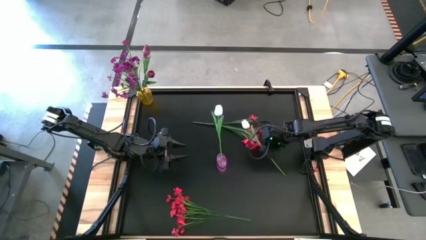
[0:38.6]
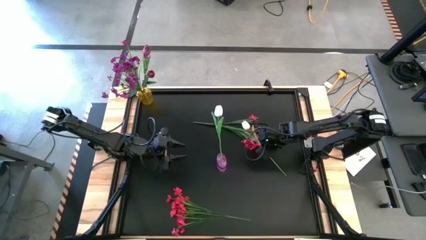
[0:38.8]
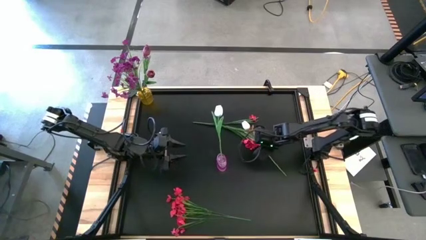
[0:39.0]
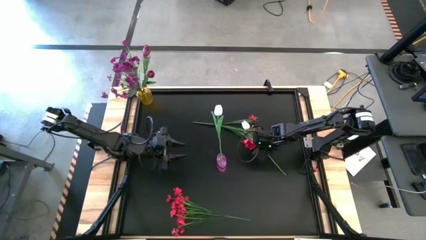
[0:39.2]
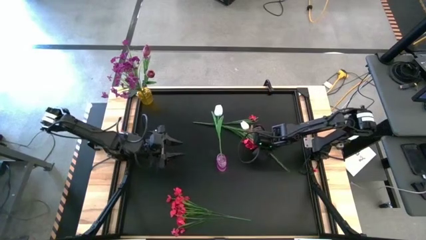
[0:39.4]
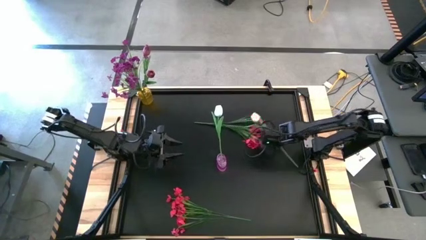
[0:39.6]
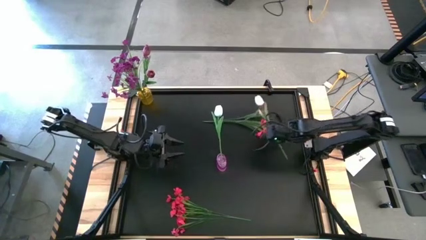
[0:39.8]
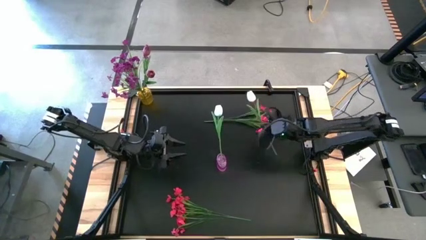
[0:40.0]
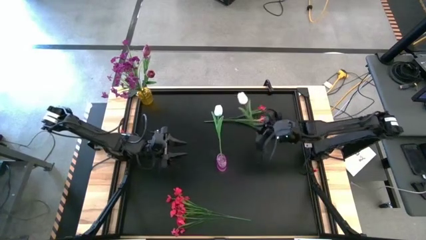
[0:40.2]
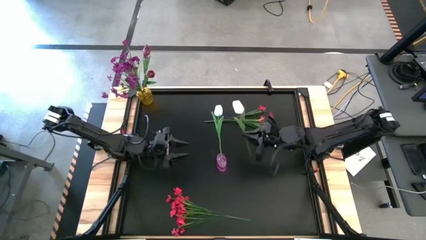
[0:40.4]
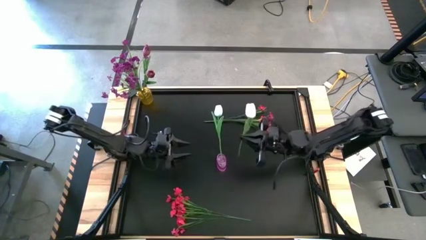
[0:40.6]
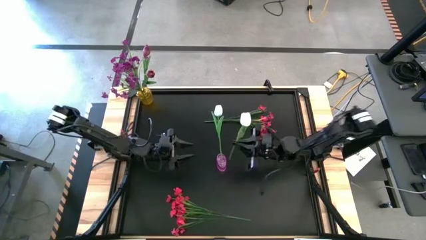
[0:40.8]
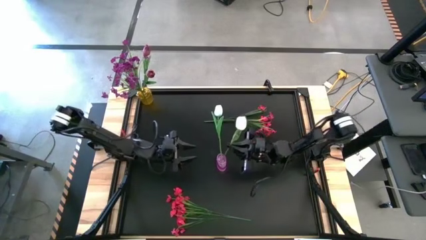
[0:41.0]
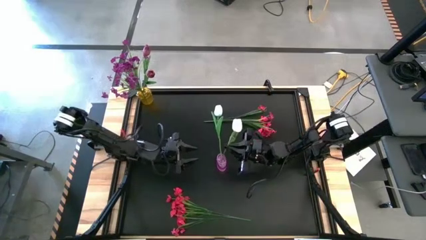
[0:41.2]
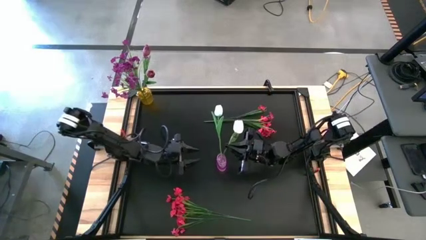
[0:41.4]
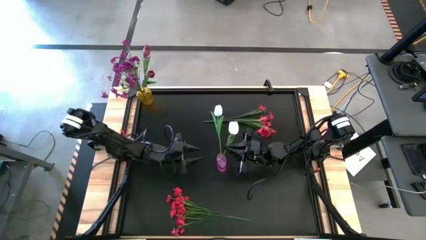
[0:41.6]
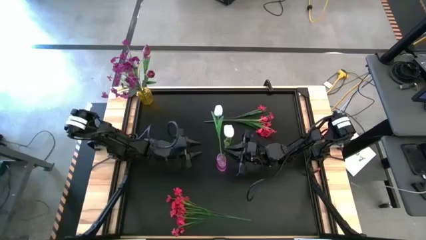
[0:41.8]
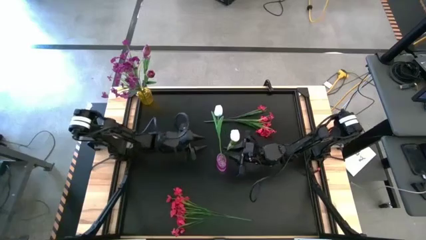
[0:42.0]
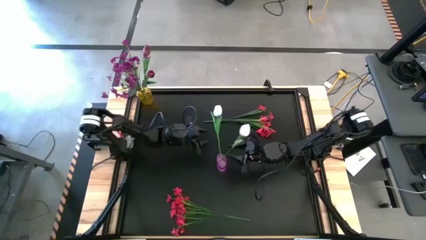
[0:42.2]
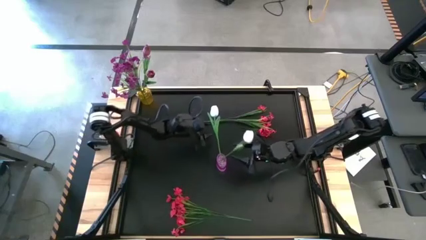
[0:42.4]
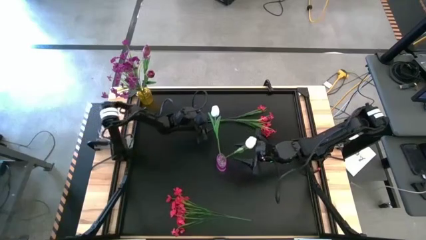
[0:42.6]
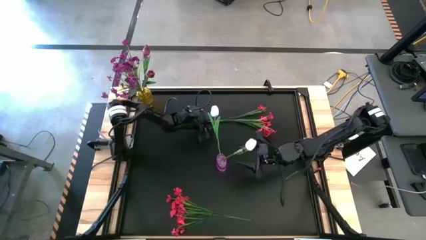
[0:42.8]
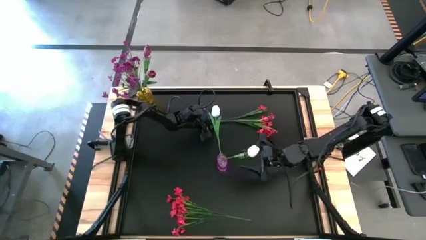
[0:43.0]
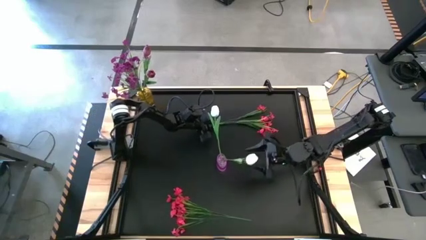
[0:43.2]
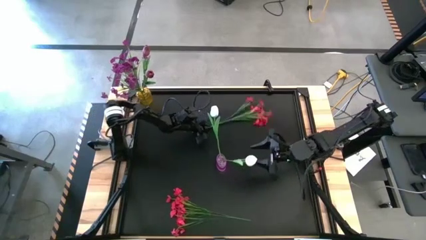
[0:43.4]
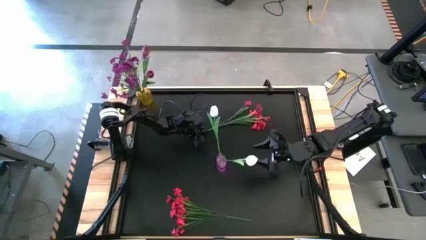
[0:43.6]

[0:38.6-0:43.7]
Task: Sort flowers into vase by color
Put the white tulip into the violet vase

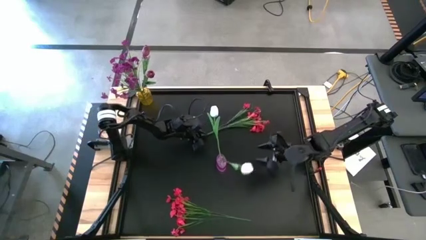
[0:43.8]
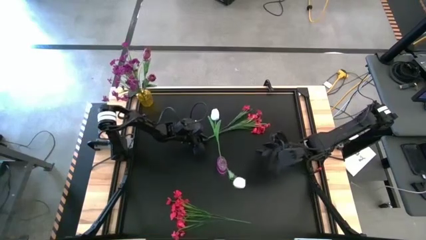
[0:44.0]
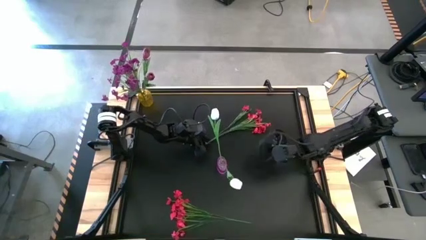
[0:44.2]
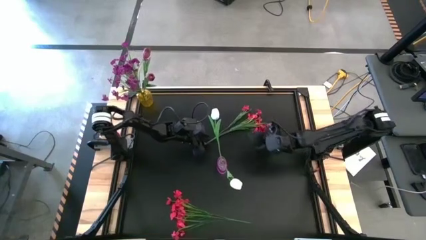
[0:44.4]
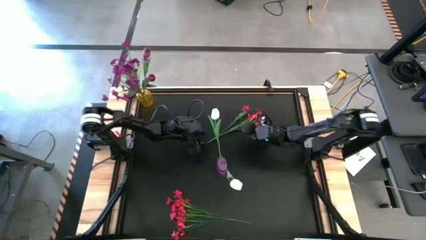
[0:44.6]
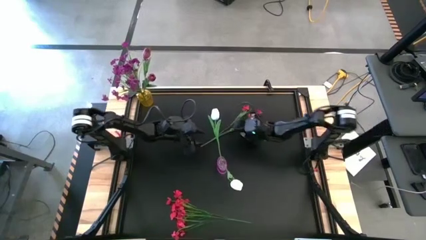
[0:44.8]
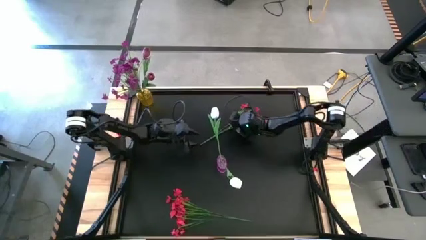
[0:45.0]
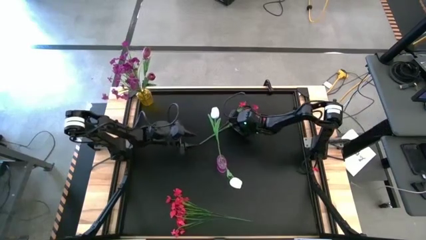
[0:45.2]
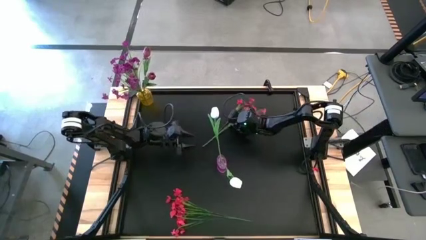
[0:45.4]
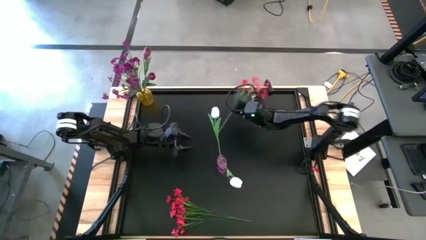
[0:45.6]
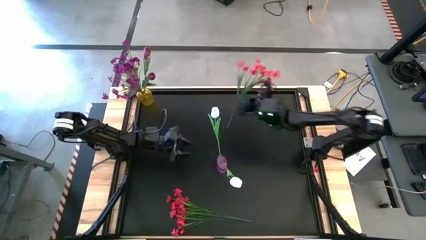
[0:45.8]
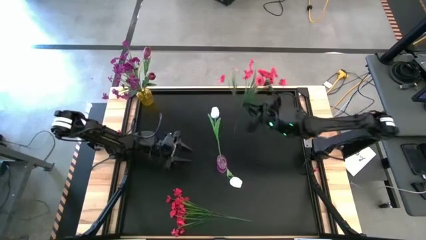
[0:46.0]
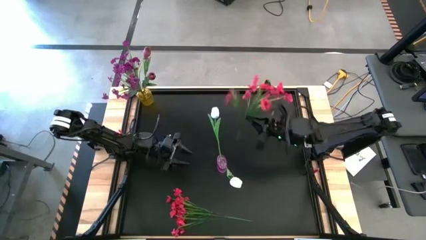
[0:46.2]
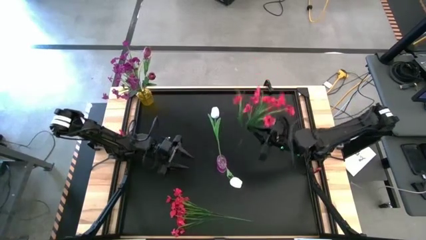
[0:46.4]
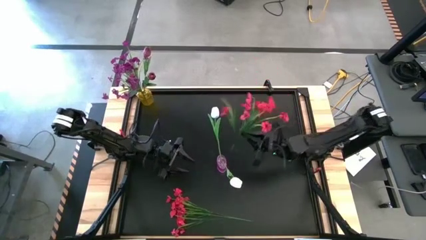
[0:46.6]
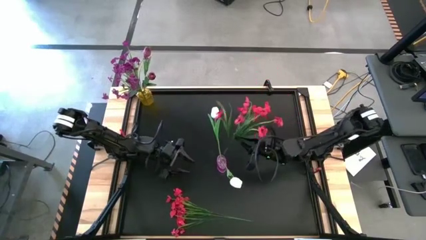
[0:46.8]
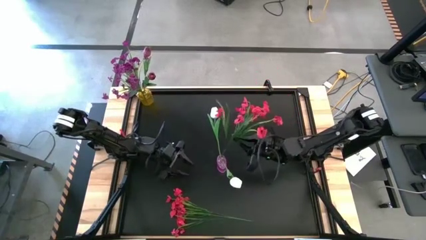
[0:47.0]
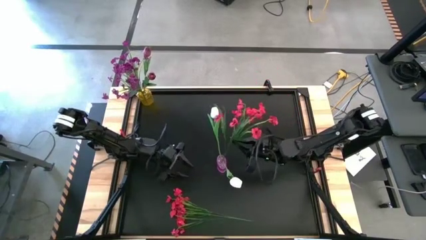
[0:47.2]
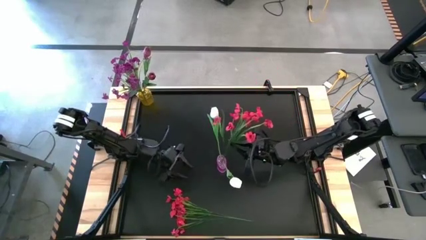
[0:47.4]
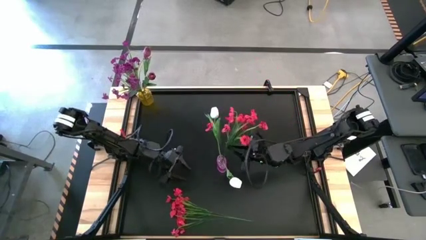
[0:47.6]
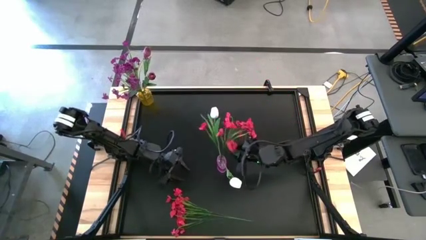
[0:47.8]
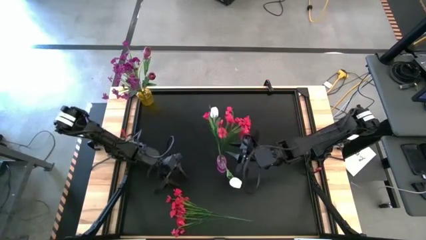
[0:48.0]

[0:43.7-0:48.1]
Put the top red flower into the violet vase

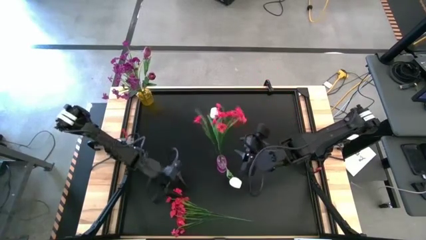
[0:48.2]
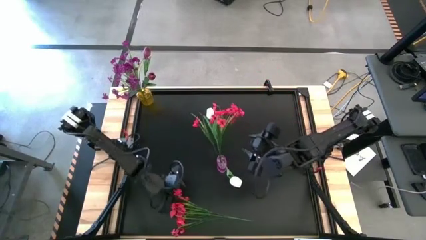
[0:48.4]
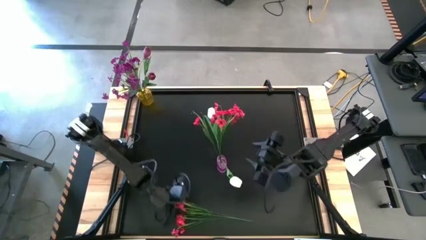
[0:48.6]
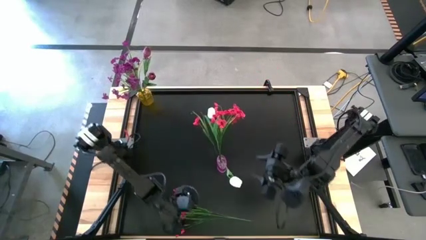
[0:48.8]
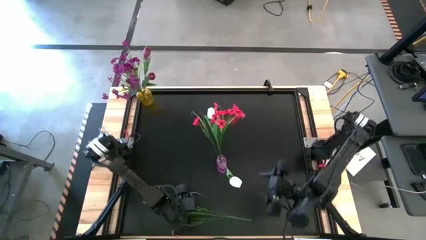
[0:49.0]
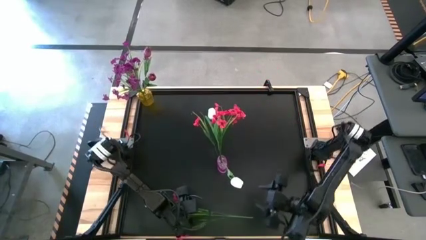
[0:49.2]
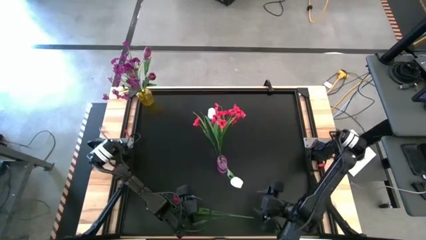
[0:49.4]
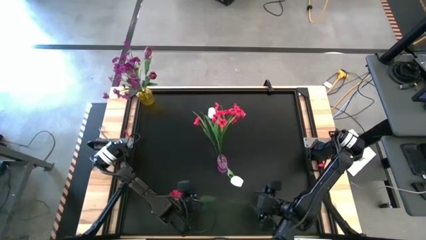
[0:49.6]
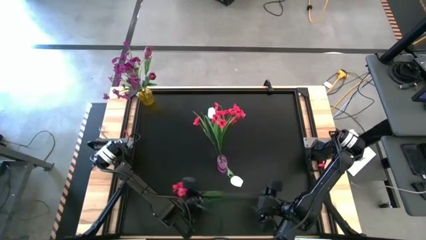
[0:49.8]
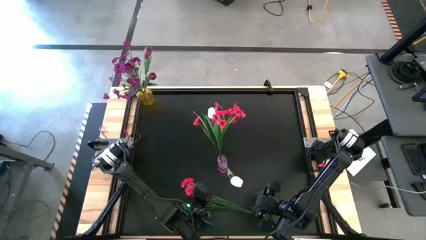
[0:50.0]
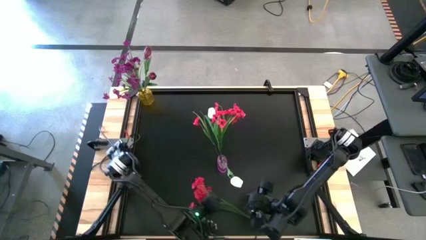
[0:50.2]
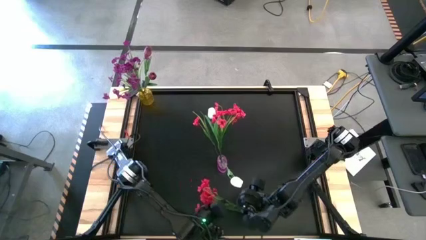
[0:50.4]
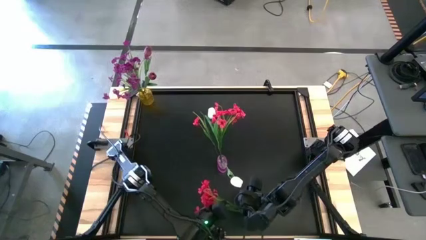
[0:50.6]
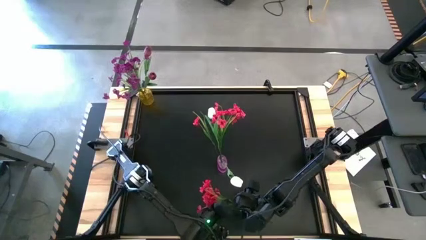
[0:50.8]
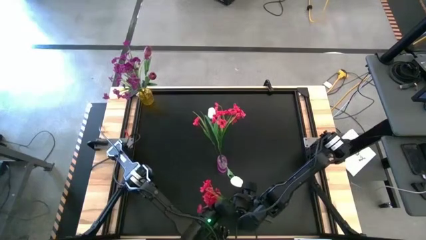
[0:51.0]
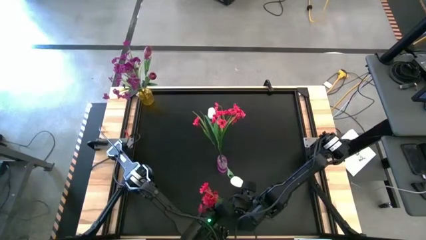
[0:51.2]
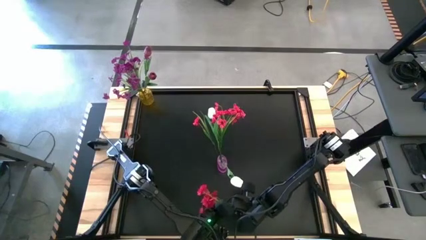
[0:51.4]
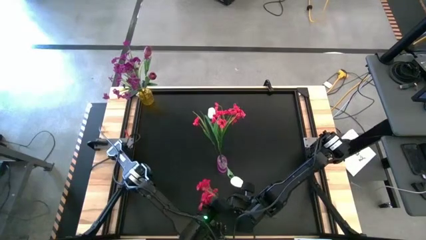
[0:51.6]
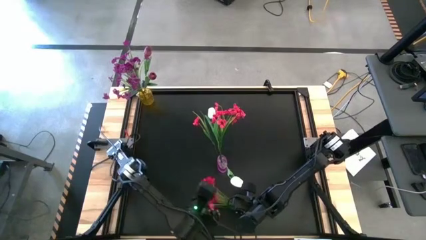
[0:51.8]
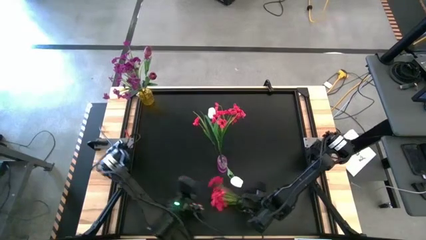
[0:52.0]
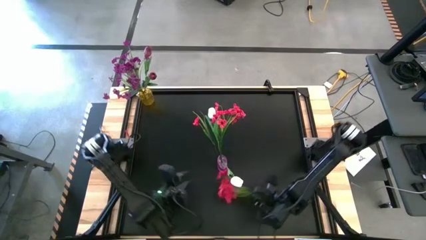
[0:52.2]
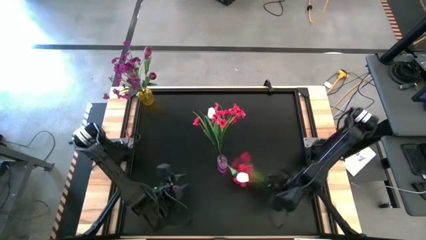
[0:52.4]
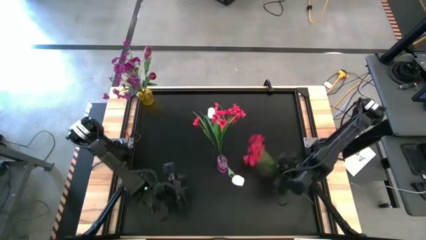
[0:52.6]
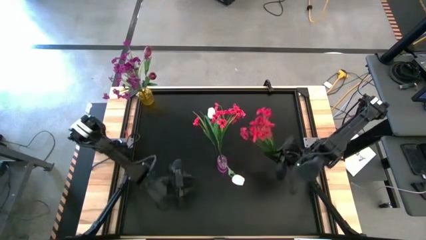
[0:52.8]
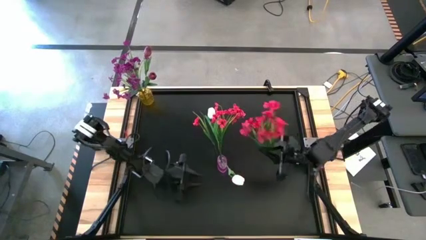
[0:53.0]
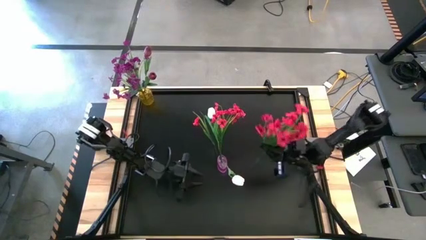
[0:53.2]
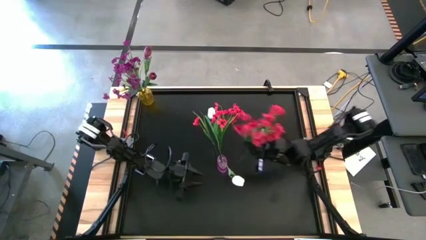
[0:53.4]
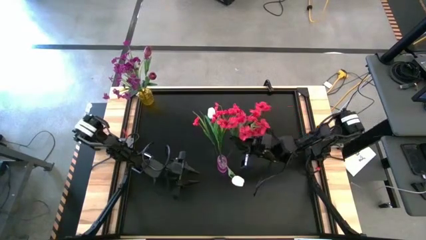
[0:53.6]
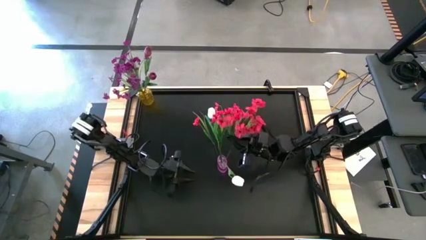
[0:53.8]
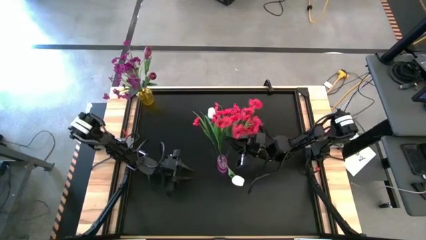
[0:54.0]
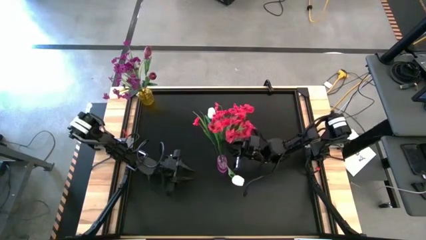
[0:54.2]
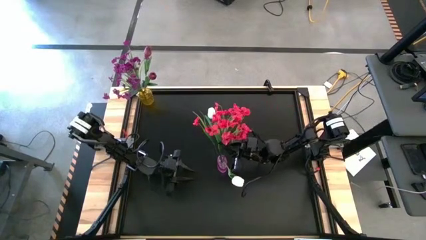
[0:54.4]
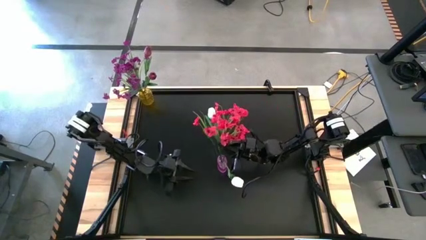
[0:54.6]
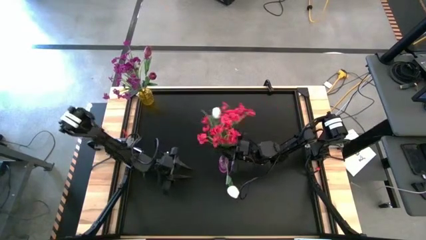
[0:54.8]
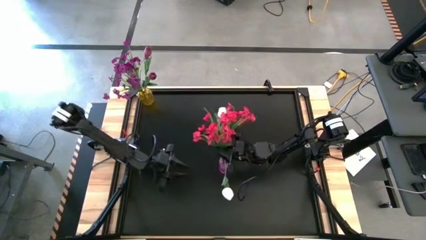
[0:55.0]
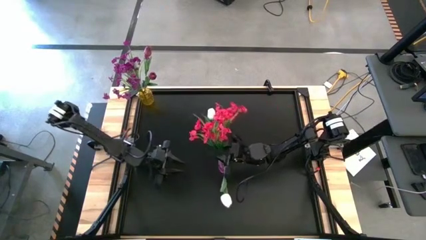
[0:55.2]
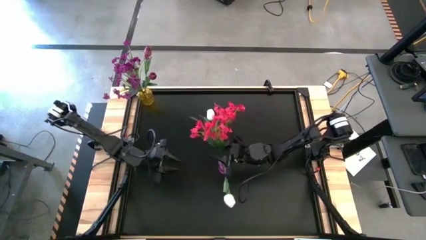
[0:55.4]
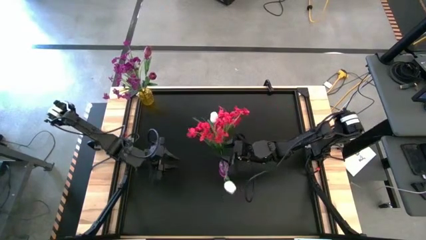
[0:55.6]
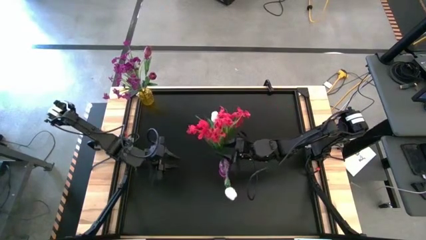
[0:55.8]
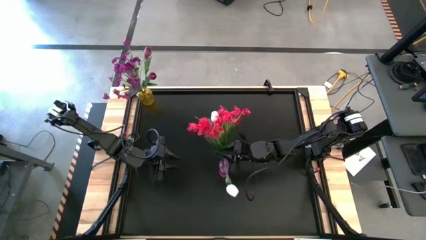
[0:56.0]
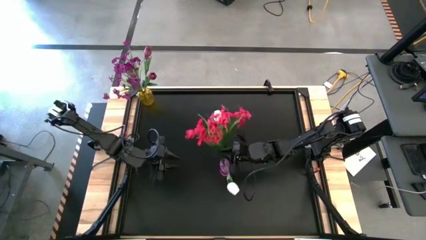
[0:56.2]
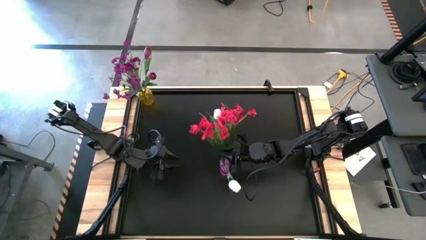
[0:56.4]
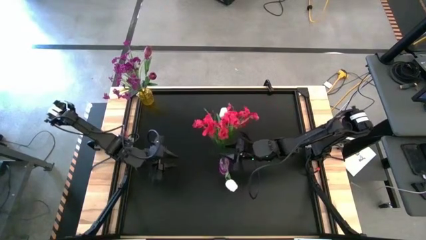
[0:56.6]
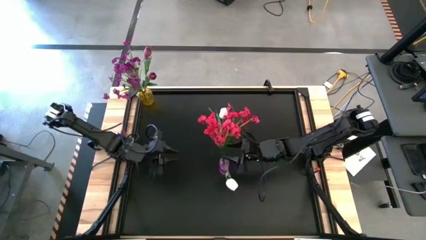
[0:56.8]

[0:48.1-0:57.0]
Put the red flower into the violet vase
